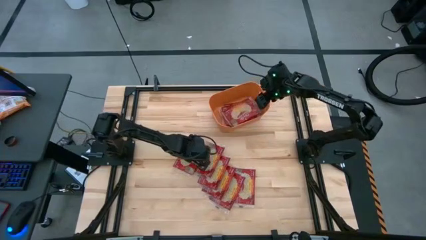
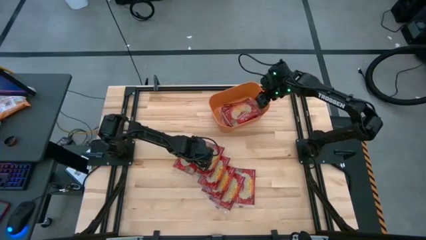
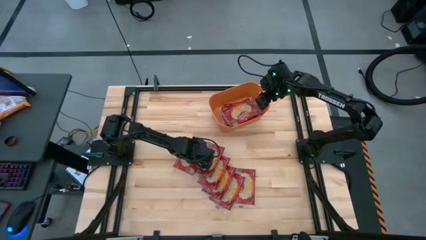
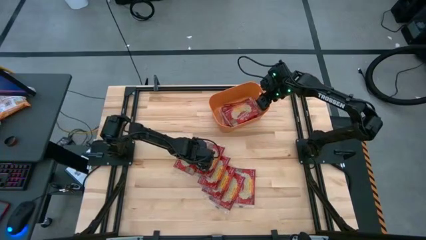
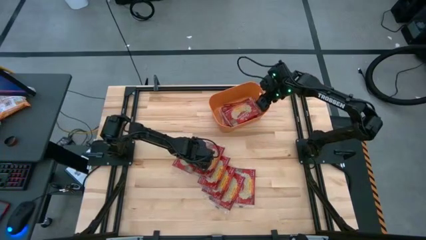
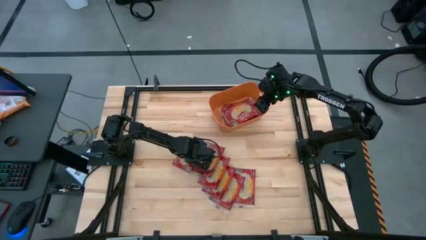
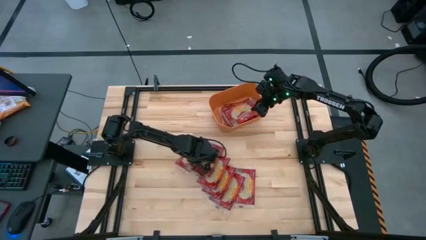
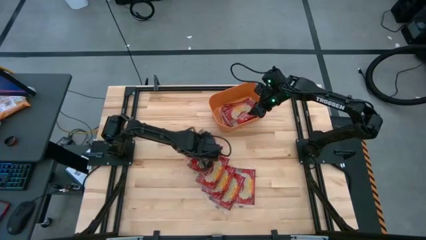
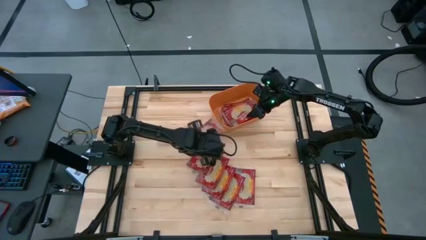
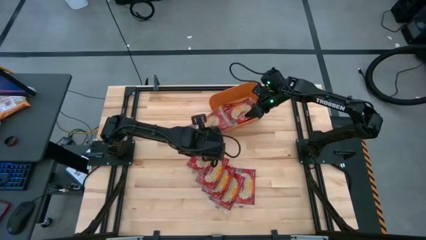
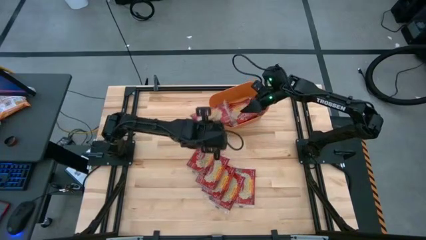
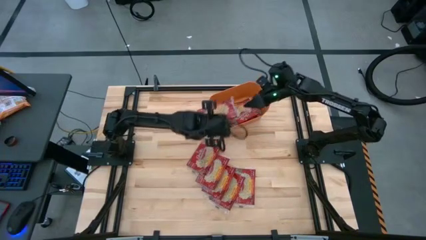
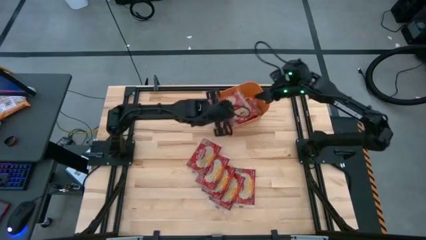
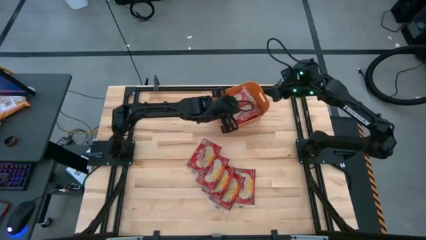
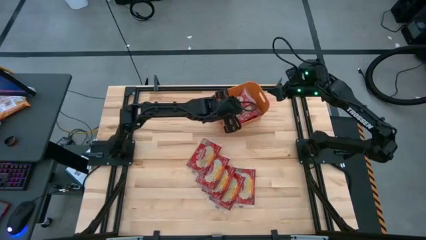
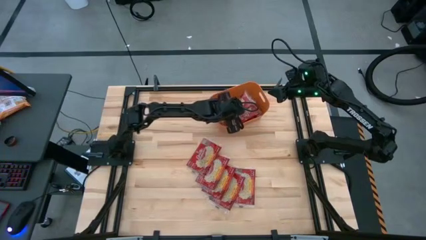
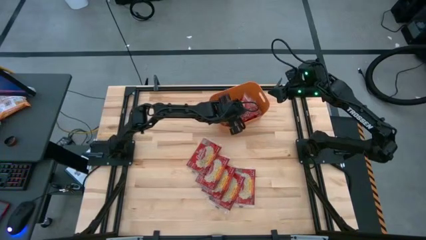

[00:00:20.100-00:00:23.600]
Task: Sort popcorn bags into baskets
Put the red popcorn bag into the orange bin

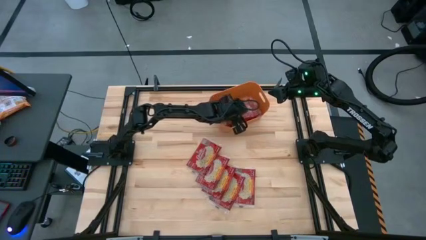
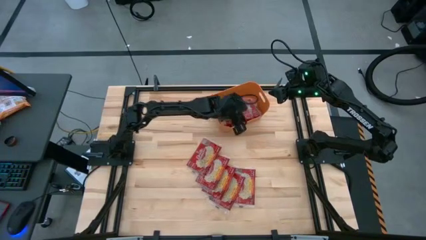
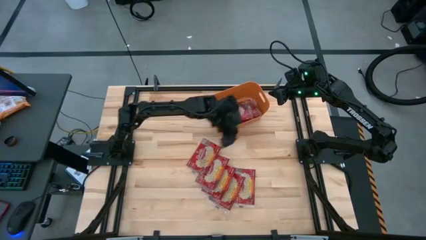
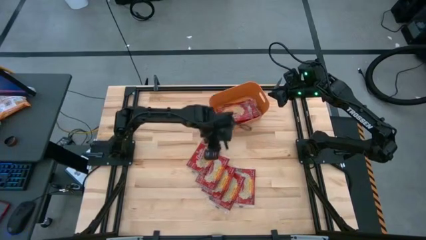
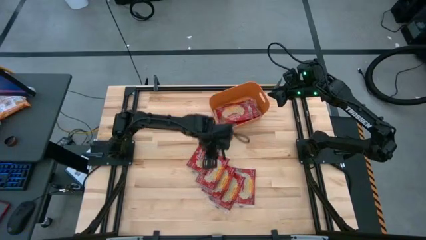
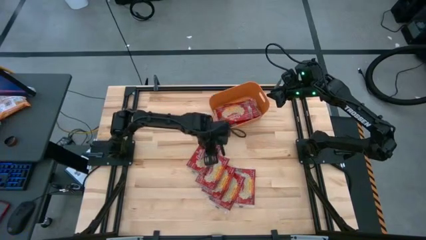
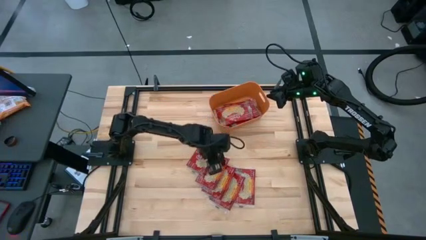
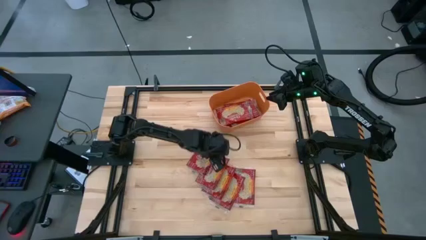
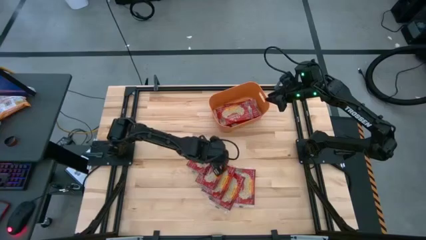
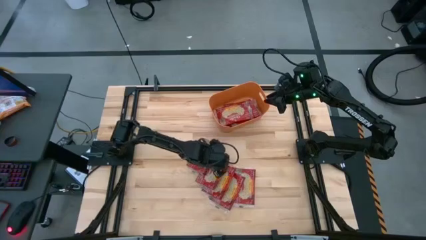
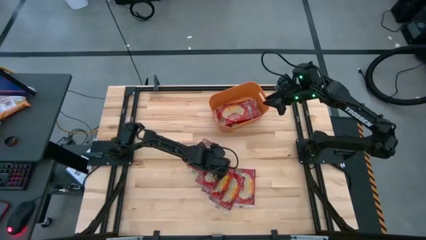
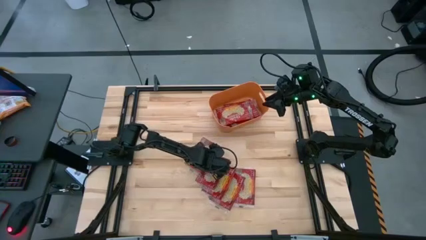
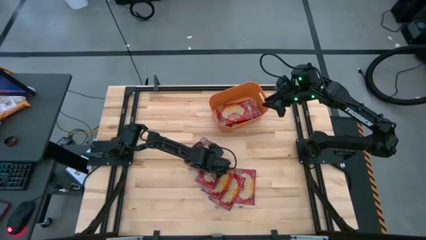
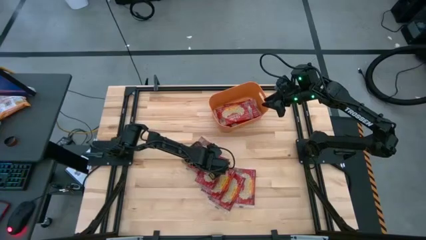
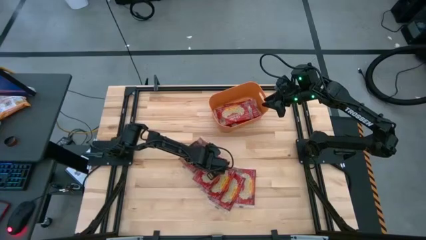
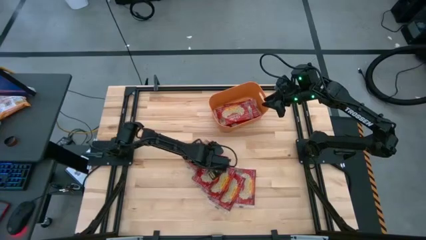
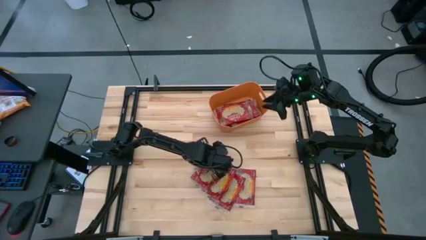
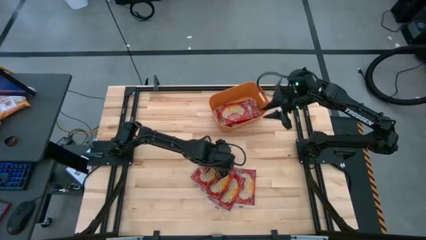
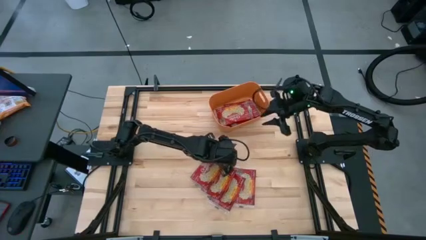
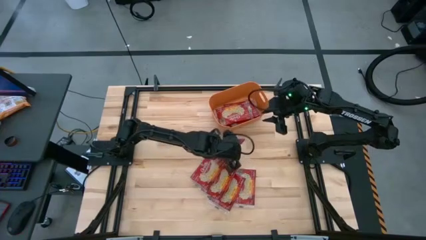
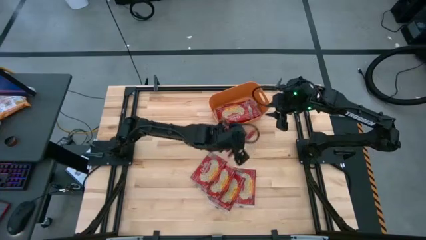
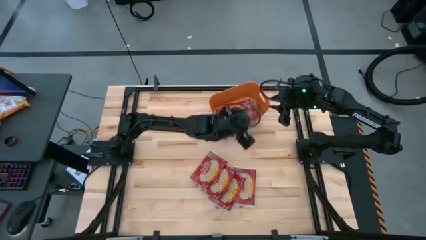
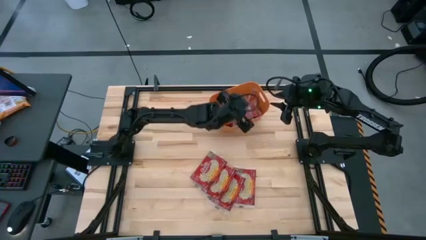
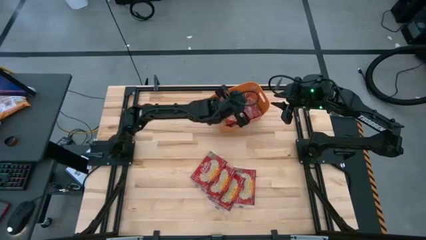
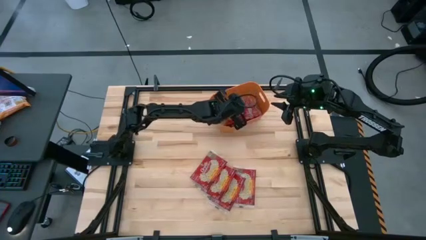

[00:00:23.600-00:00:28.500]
Put the red popcorn bag into the orange bin

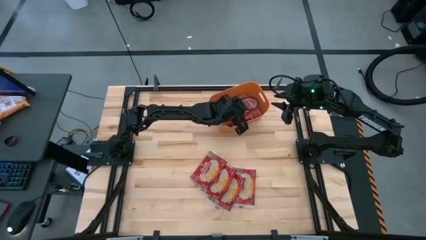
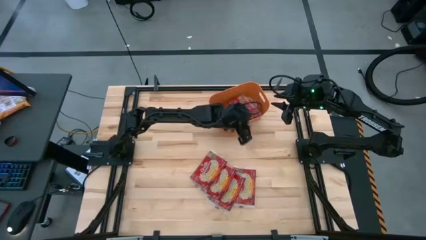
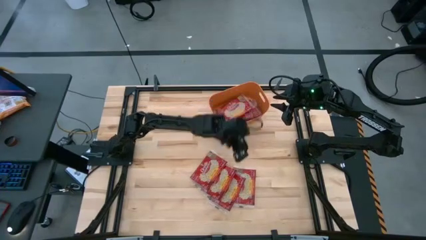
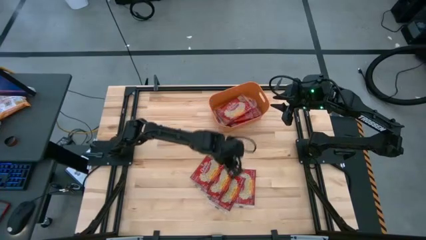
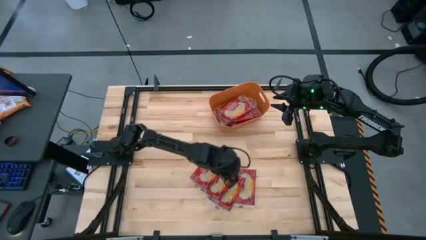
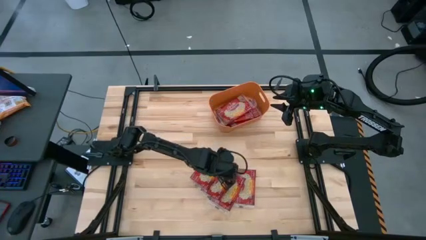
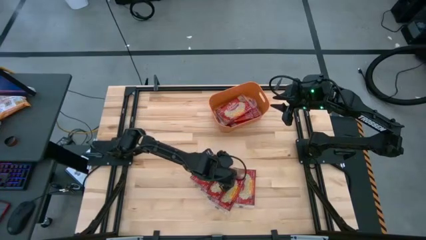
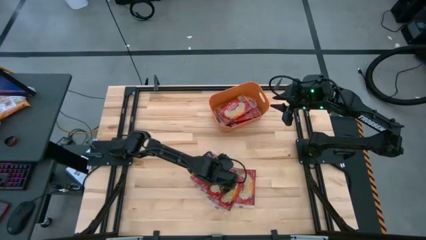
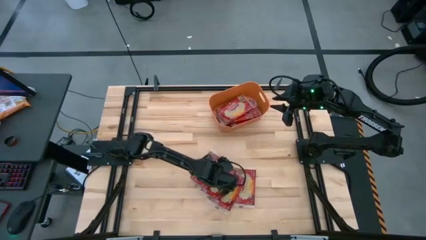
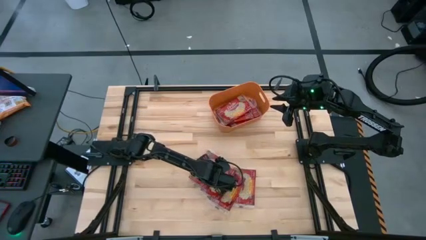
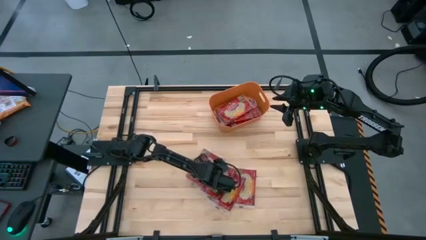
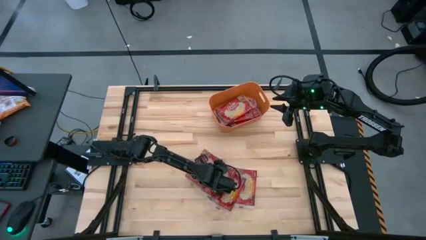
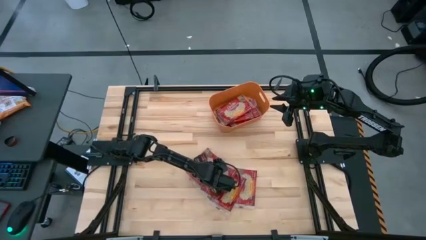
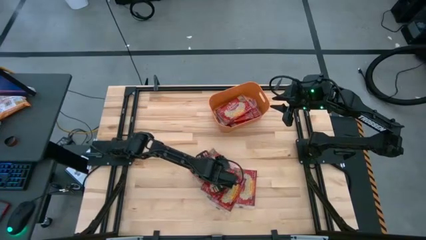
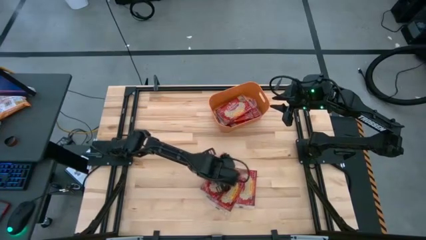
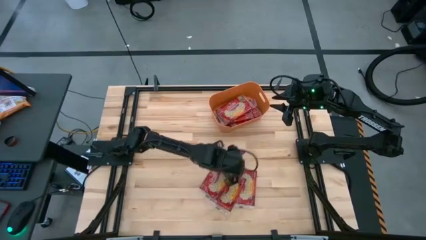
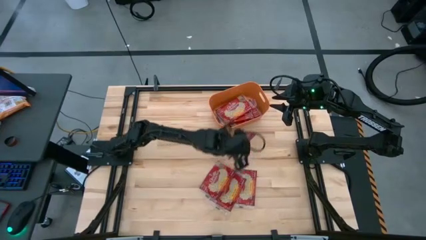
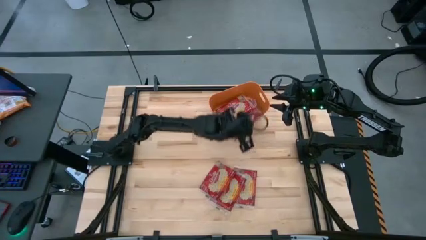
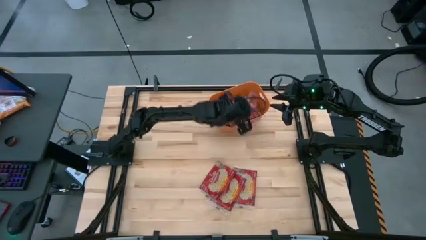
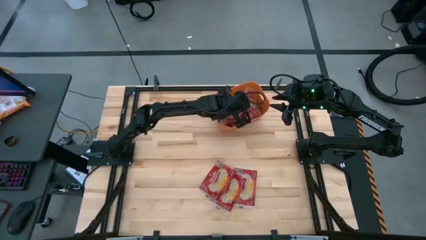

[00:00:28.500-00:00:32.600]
Put the red popcorn bag into the orange bin

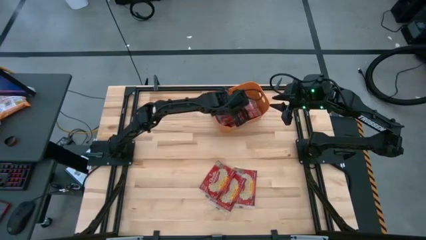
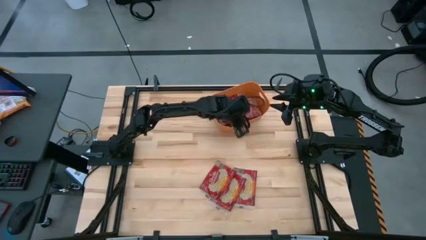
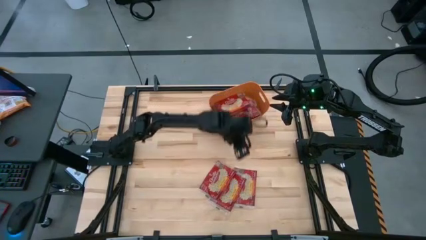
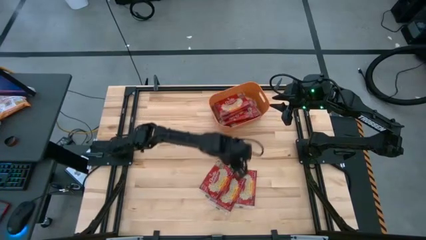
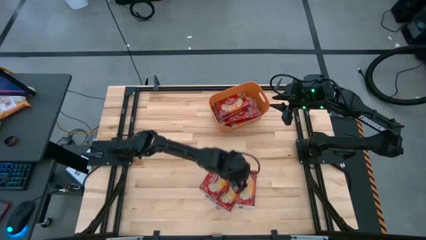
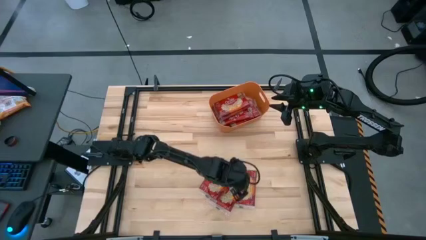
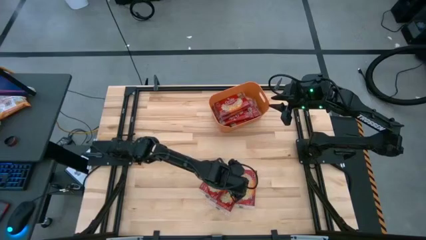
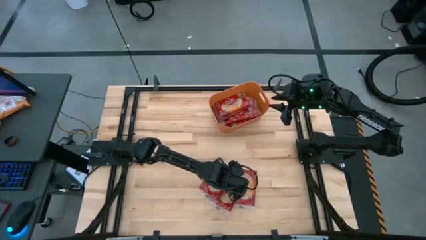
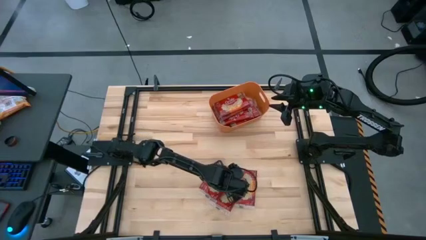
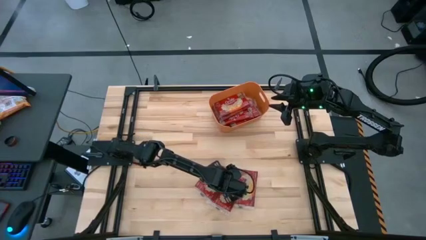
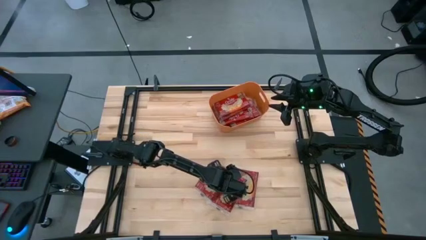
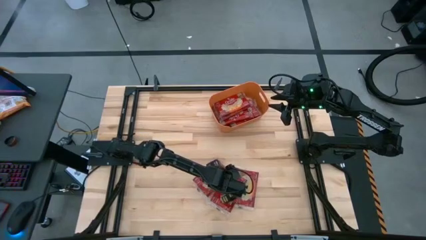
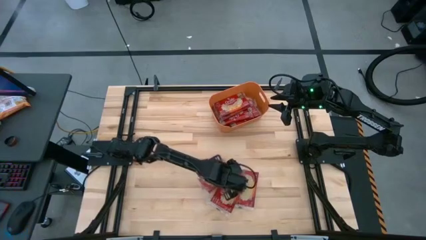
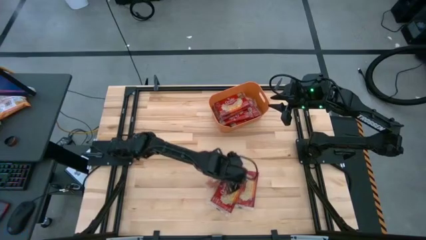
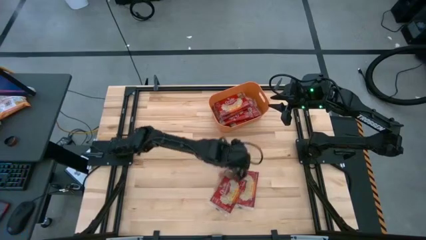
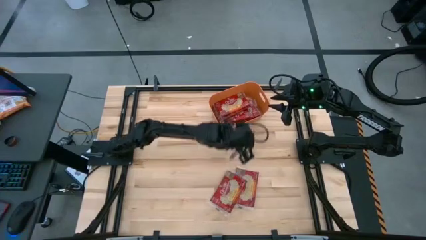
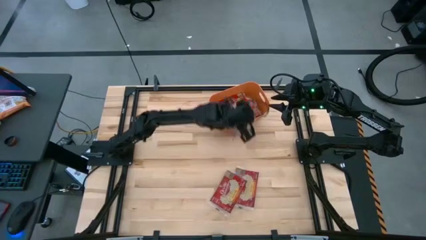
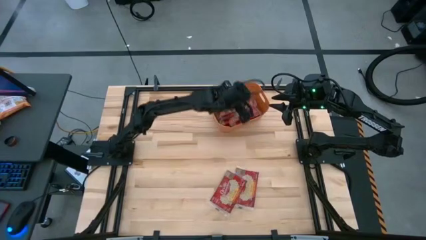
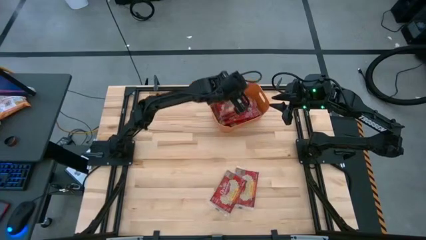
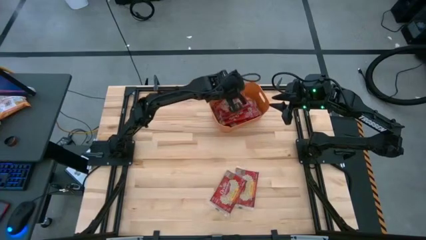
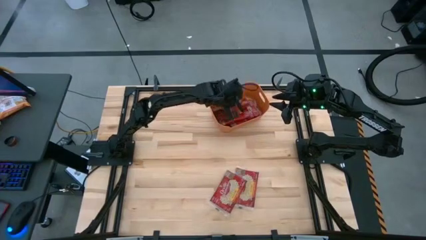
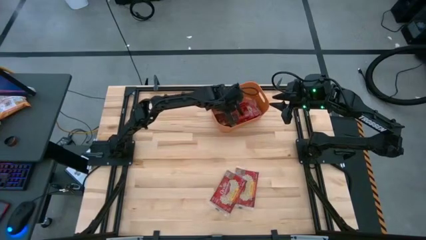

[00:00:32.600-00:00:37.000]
Put the red popcorn bag into the orange bin
